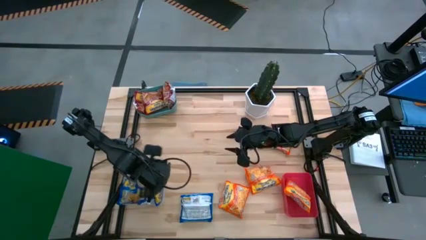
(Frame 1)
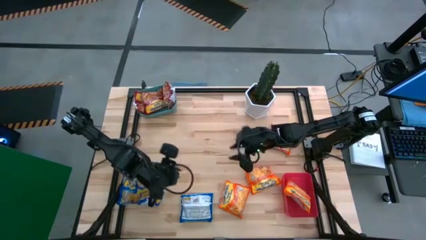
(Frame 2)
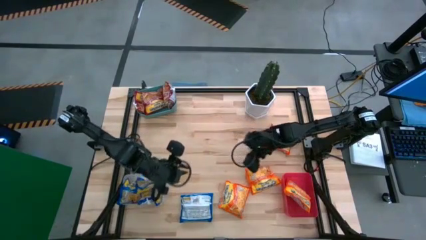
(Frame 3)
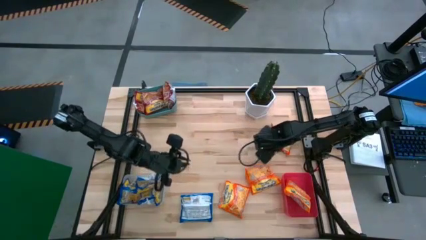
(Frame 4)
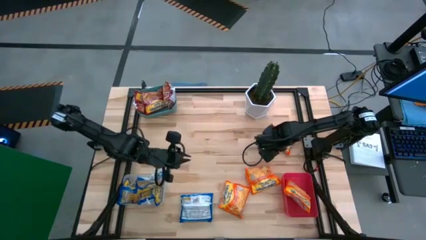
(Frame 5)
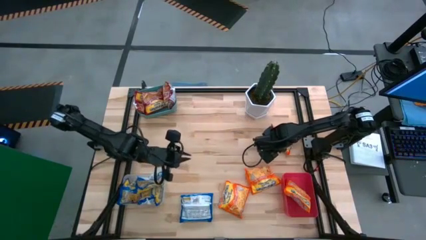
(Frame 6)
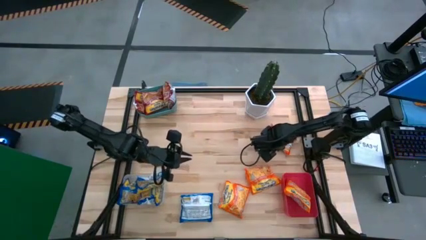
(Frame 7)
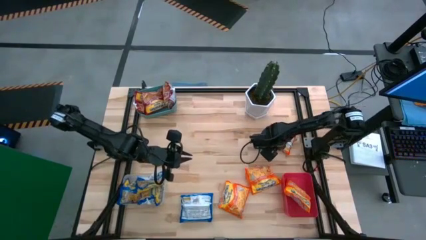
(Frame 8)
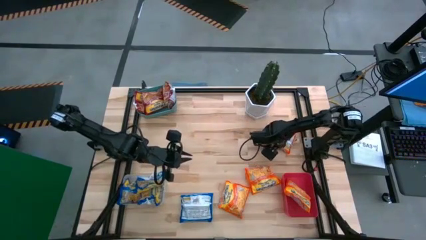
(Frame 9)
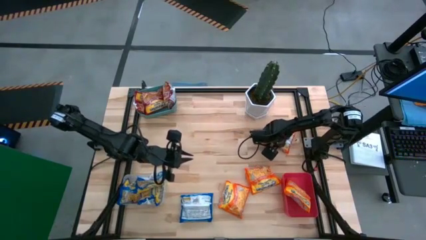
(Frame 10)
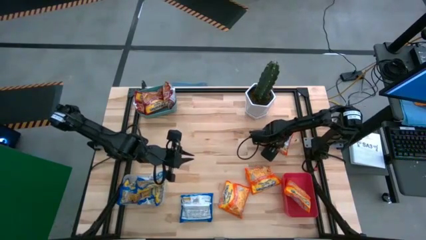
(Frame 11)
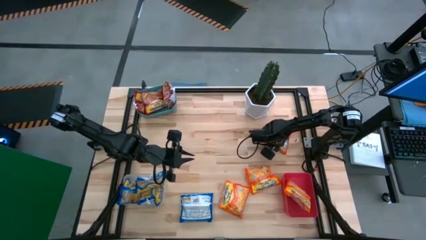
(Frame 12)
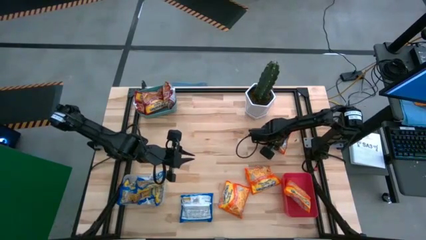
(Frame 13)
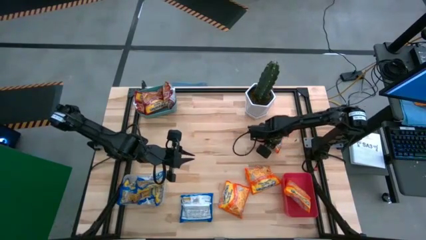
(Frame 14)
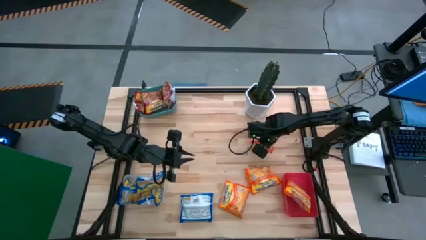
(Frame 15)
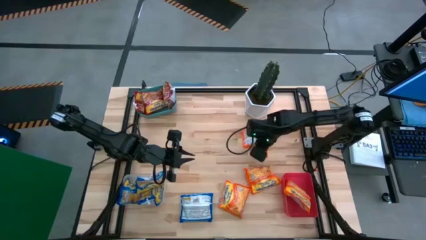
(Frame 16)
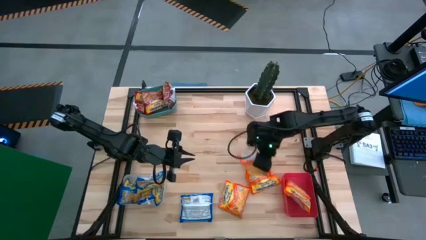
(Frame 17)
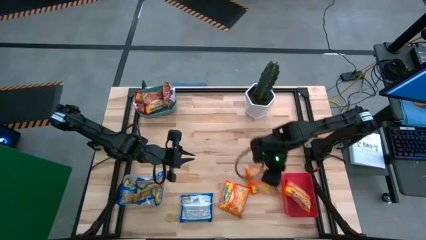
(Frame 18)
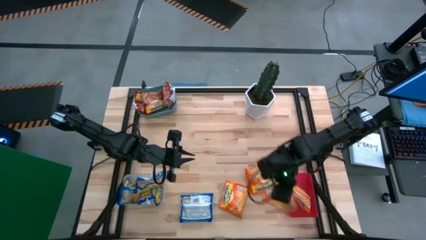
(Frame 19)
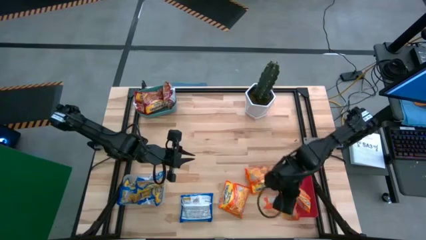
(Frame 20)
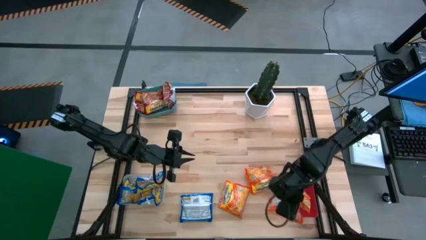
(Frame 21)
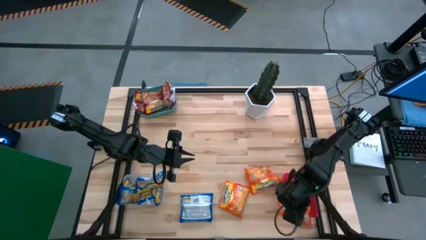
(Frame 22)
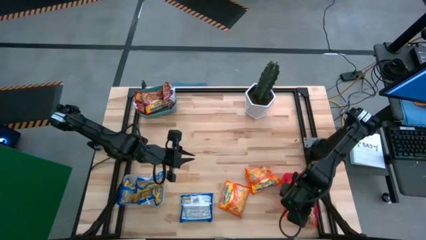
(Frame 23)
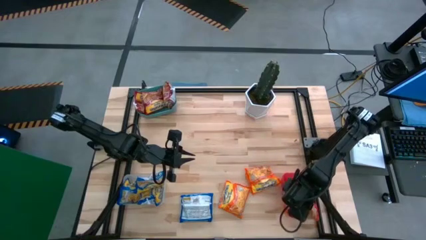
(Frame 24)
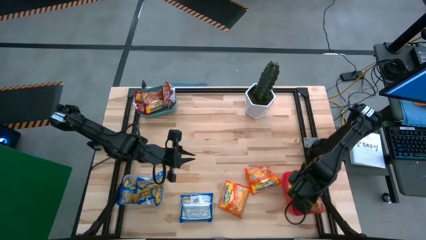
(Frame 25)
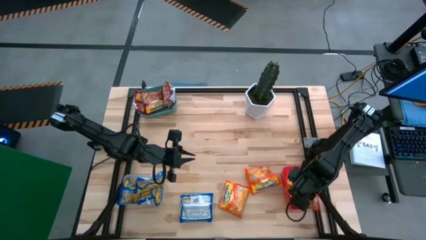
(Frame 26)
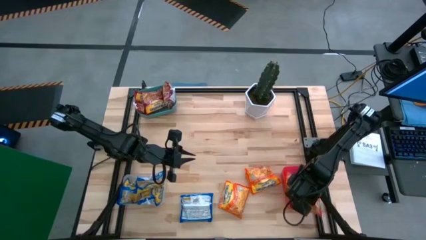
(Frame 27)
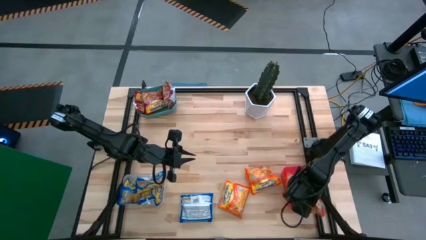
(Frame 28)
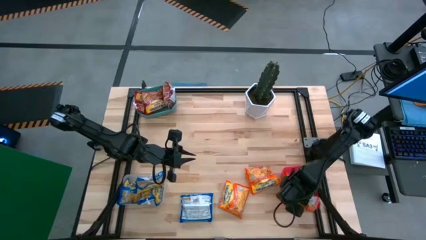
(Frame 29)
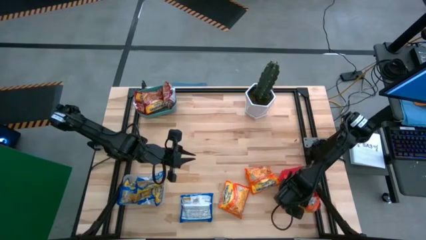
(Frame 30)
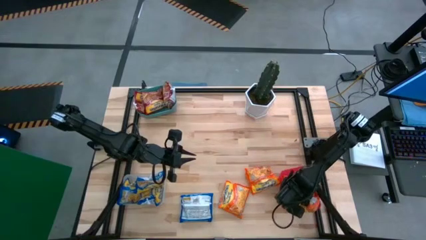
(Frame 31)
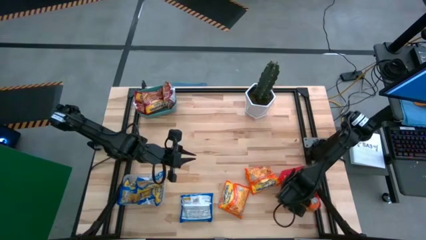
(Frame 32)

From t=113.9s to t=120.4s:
Task: Sort Maruchan noodles
Put the top orange noodle pack into the red bin

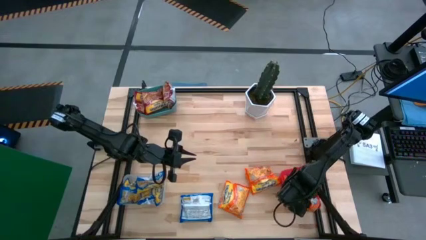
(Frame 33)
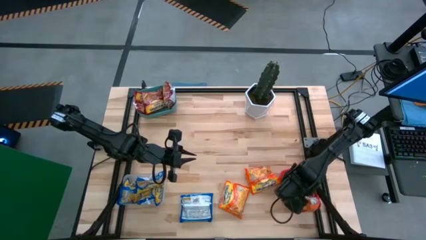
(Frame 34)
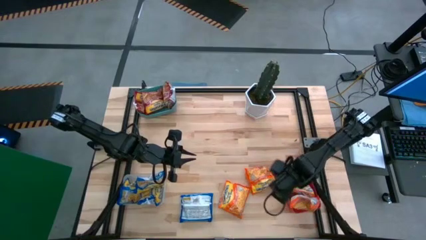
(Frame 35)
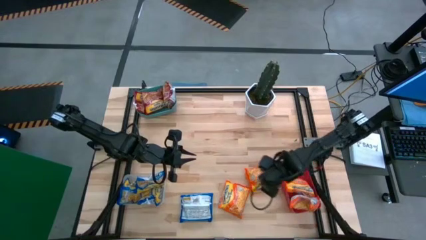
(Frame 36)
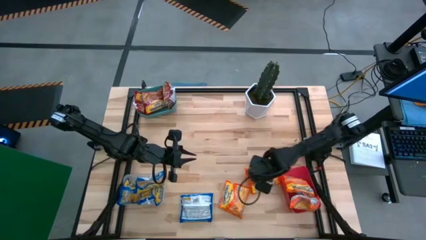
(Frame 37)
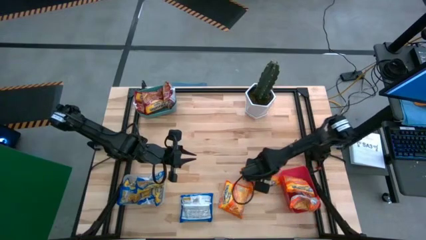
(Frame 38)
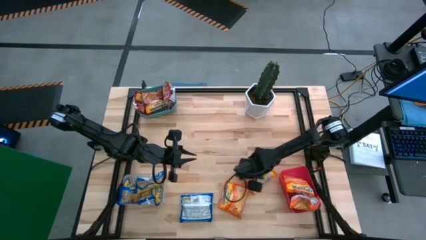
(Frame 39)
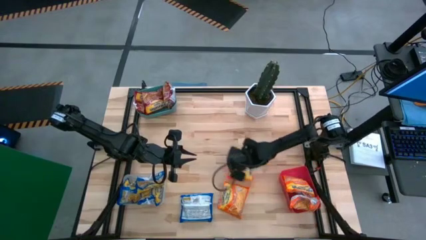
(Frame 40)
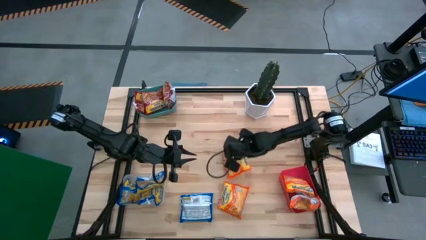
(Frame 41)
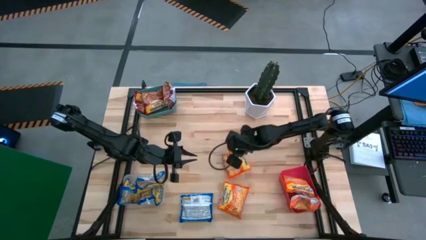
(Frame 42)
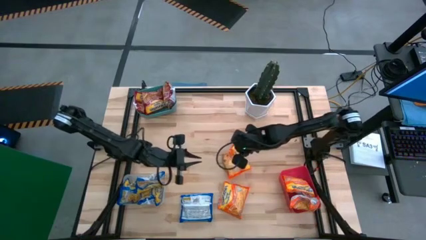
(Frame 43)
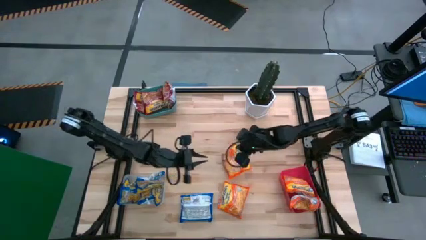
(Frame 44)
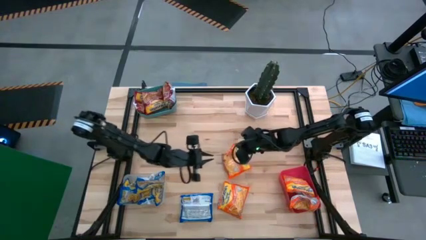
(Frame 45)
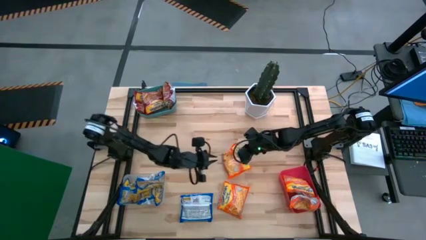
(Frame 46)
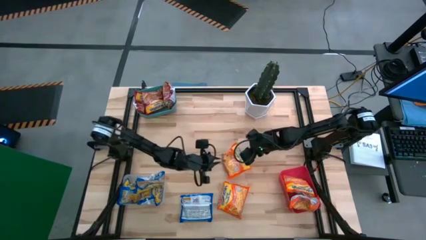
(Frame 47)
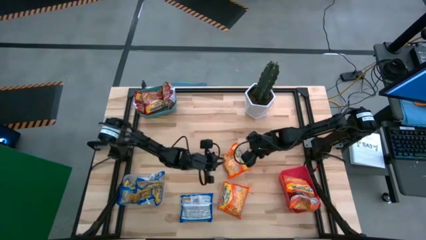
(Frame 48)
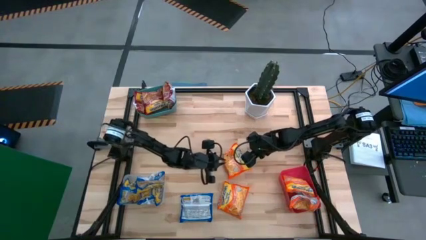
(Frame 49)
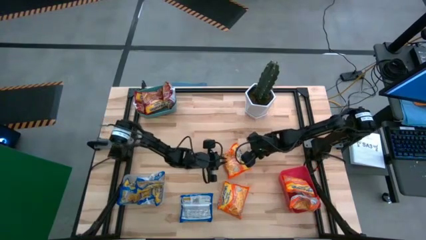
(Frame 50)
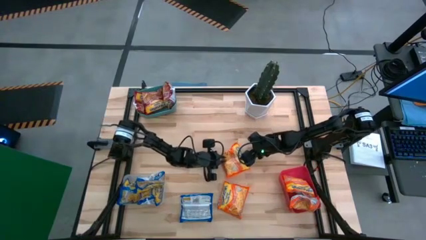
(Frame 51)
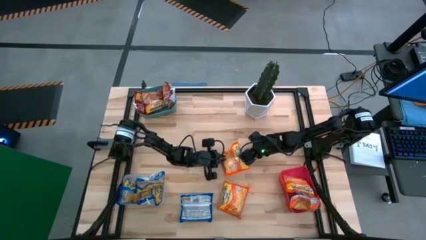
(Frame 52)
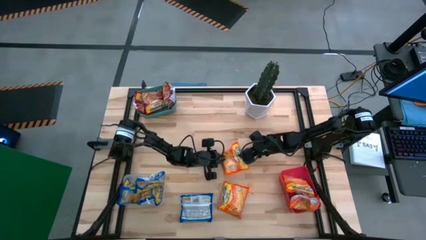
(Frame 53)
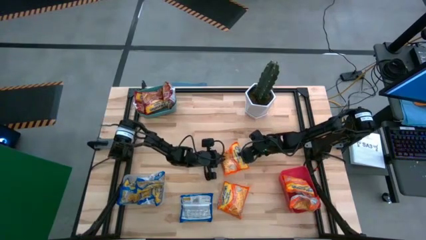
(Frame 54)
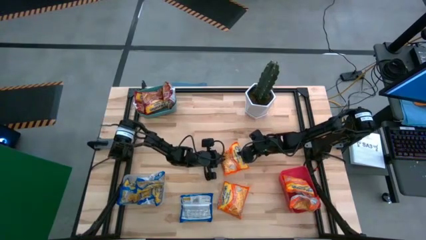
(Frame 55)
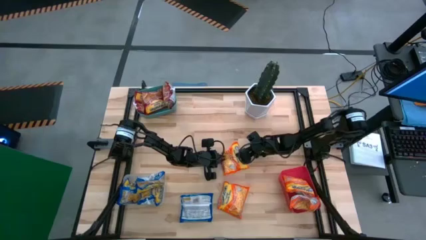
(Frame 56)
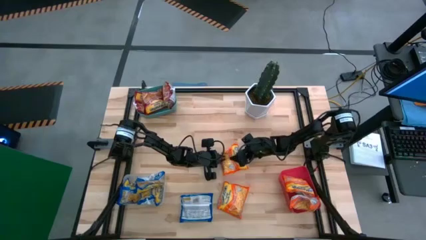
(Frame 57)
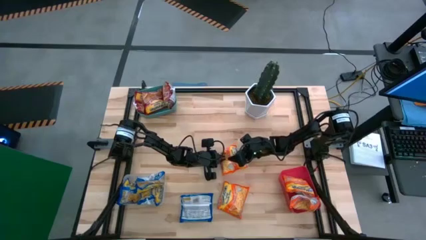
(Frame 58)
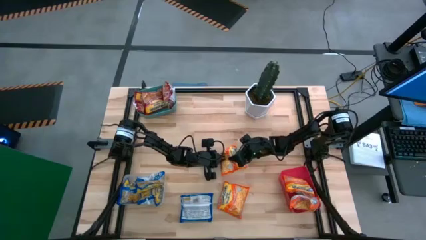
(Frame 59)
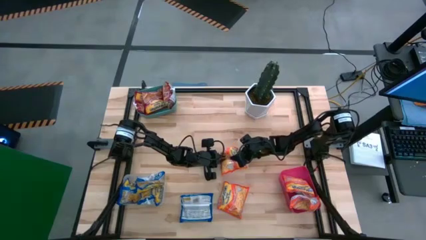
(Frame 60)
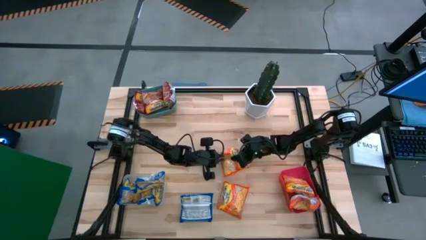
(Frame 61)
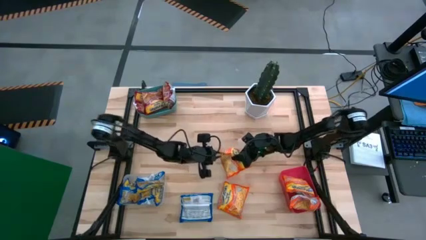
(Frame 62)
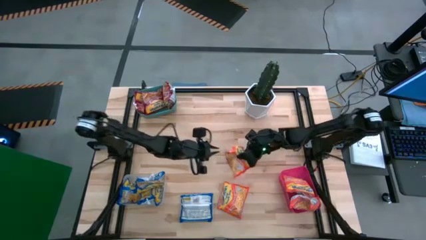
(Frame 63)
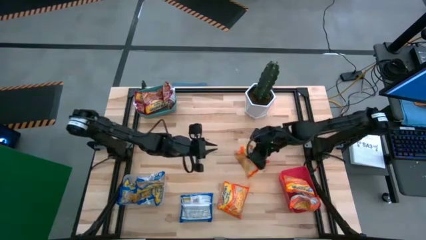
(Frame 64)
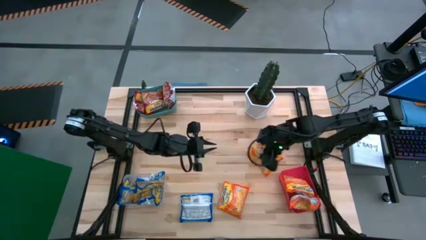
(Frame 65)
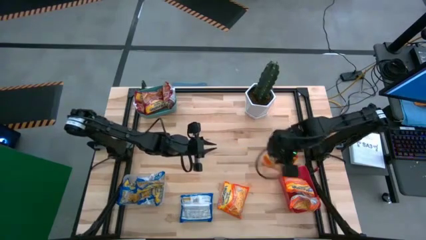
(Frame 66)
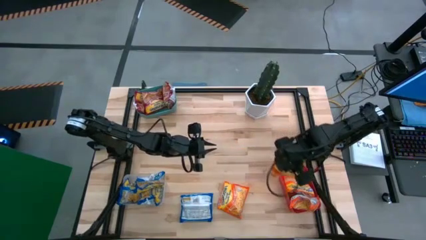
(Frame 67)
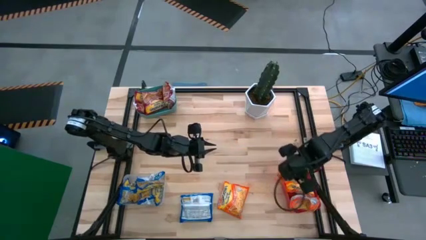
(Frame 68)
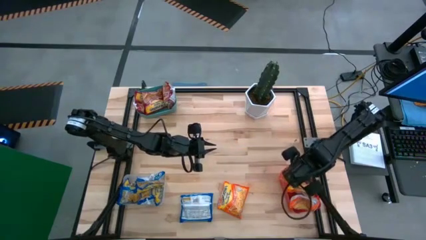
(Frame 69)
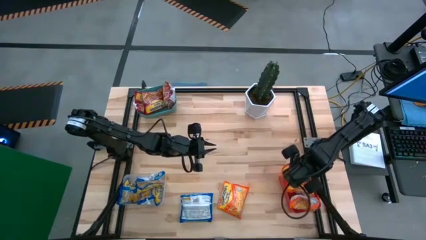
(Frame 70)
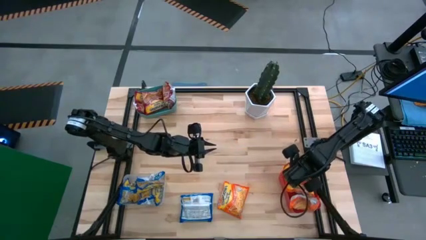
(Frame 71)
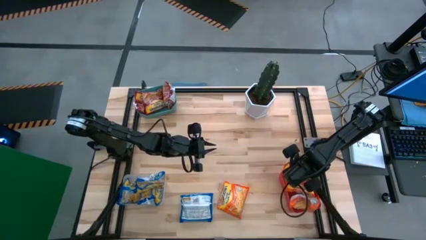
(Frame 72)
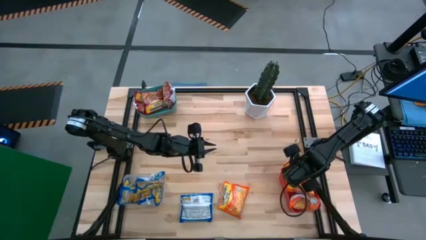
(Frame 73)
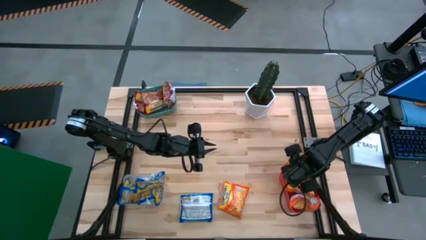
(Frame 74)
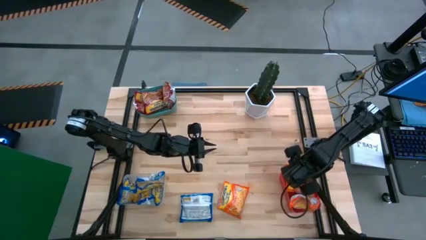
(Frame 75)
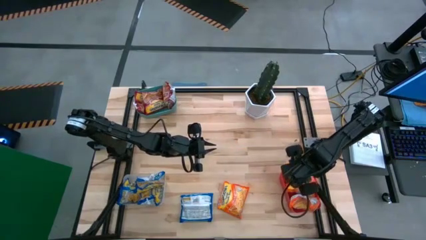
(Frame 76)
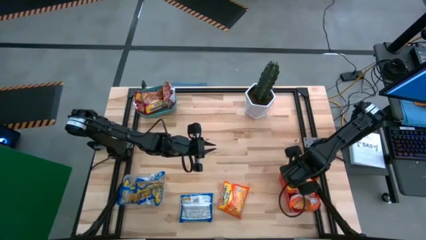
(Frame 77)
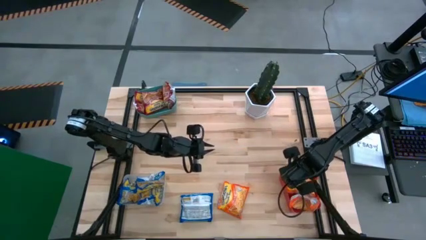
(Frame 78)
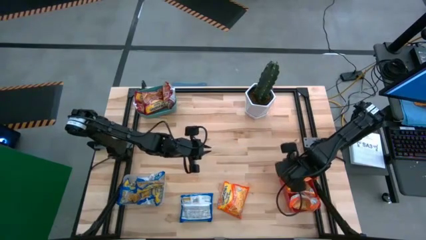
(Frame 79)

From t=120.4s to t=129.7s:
Put the top orange noodle pack into the red bin

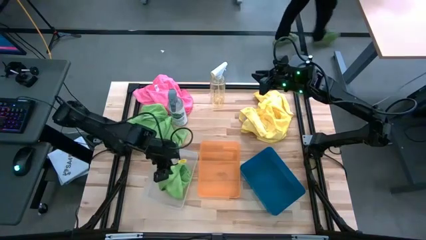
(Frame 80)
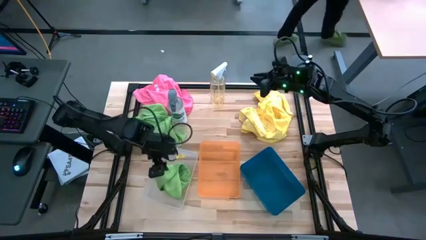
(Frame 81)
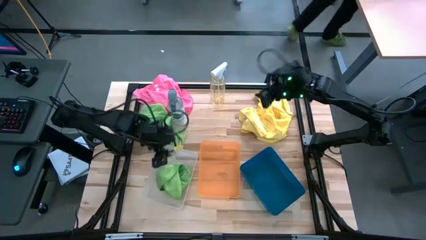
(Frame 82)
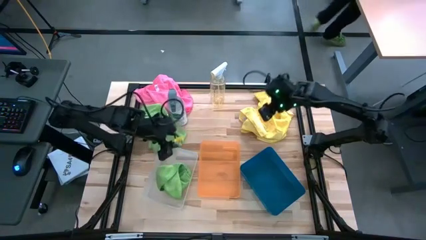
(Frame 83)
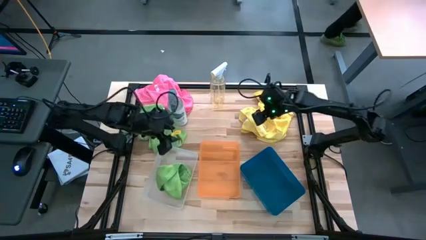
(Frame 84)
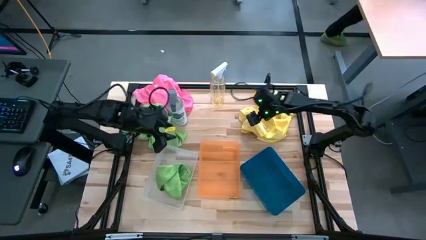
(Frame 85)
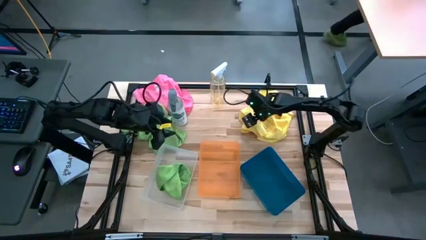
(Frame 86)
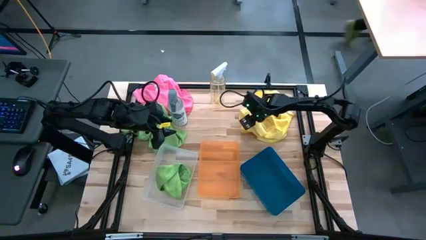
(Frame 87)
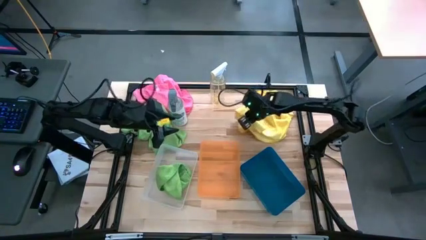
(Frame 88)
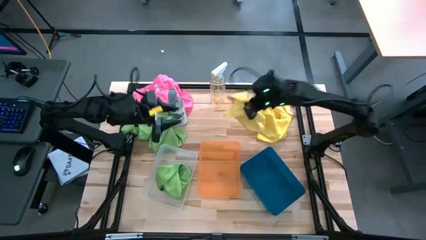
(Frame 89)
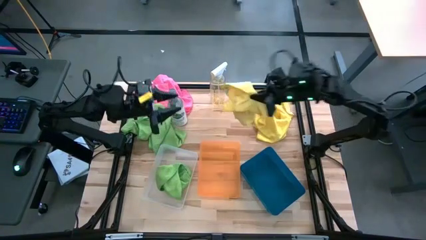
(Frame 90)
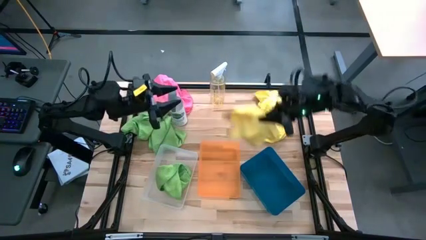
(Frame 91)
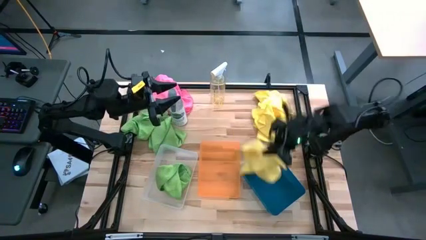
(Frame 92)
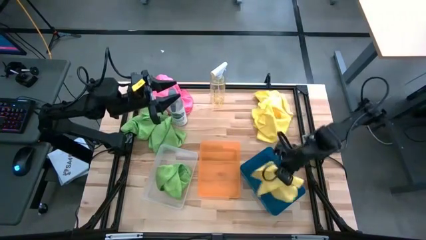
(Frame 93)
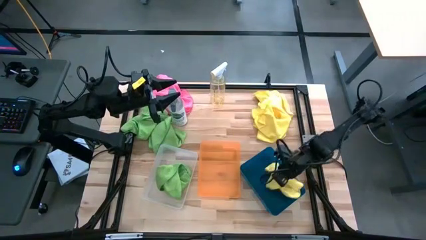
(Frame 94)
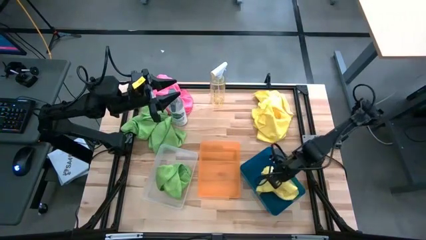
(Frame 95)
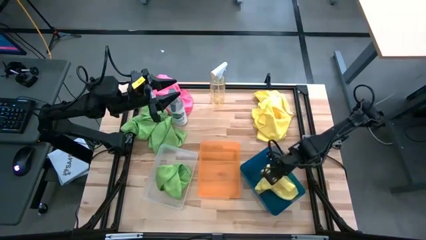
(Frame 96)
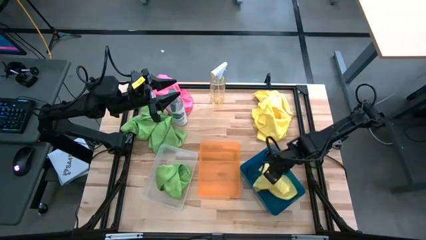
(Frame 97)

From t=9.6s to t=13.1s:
Task: Sort microfiber towel by color & place in baskets
Put the yellow towel into the blue bin
